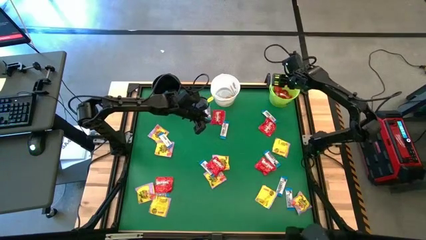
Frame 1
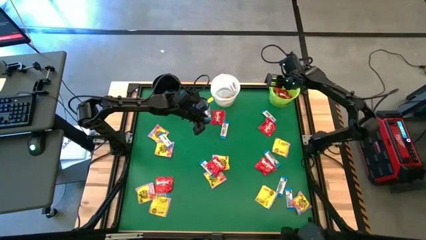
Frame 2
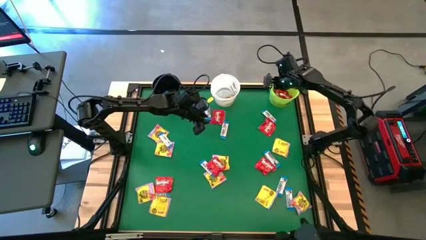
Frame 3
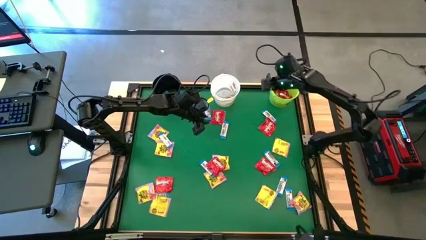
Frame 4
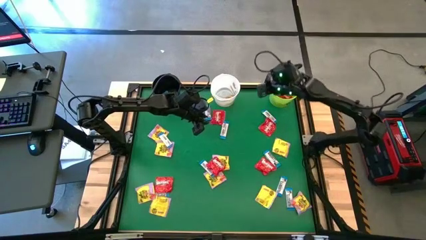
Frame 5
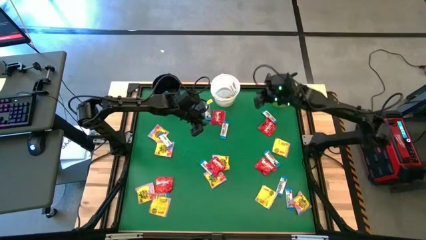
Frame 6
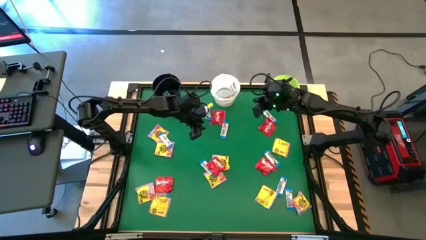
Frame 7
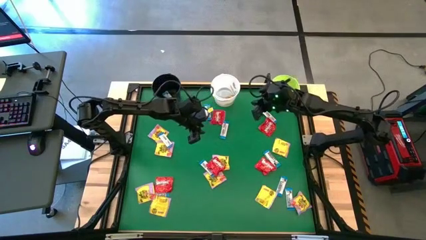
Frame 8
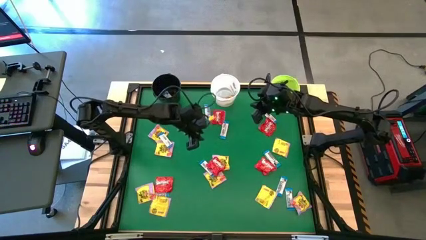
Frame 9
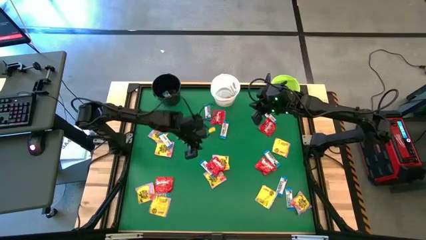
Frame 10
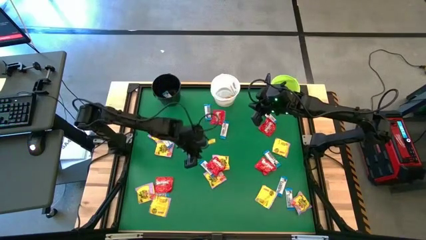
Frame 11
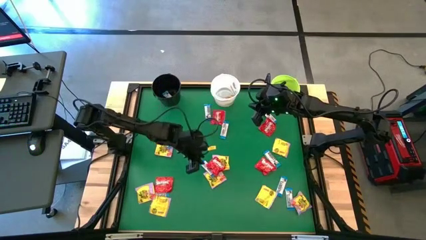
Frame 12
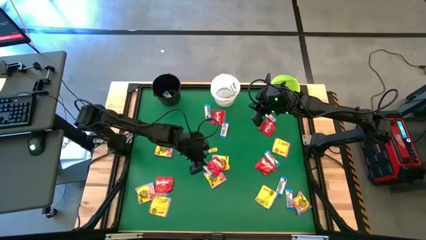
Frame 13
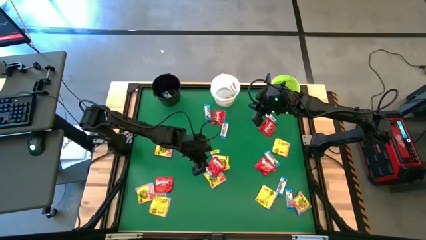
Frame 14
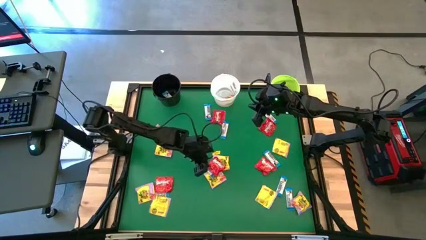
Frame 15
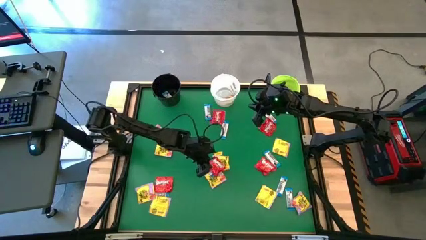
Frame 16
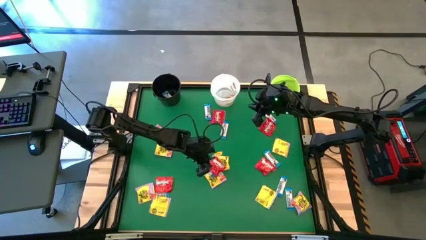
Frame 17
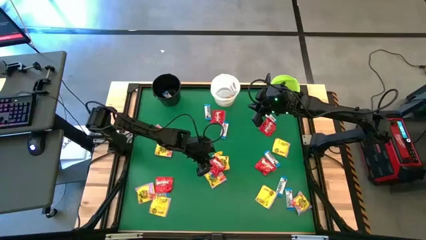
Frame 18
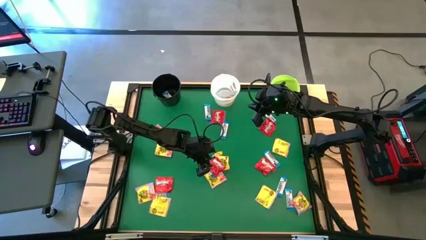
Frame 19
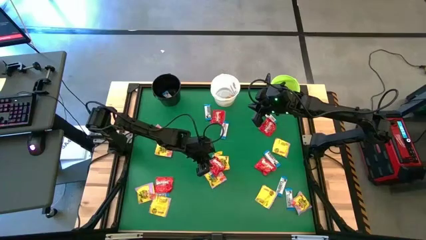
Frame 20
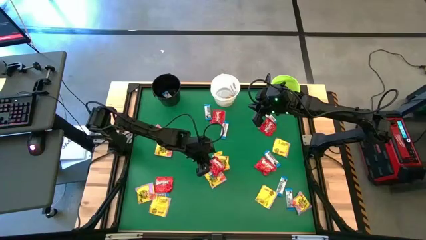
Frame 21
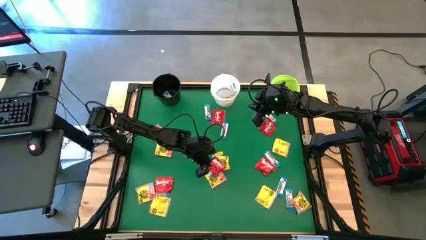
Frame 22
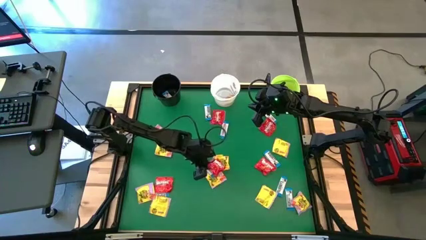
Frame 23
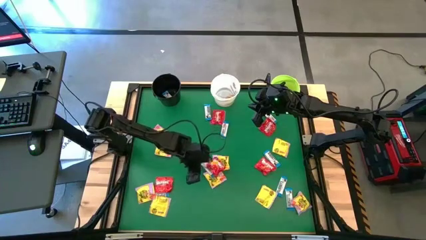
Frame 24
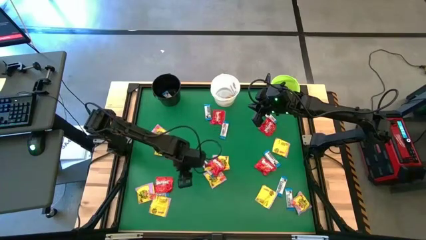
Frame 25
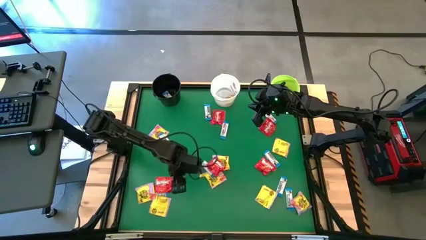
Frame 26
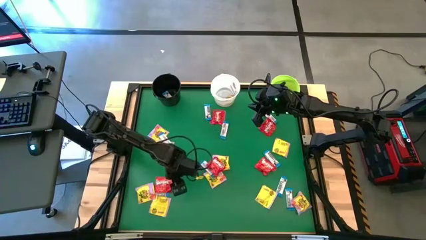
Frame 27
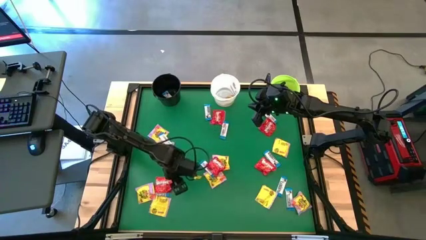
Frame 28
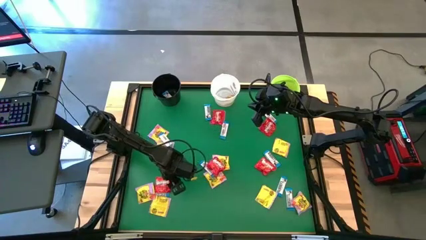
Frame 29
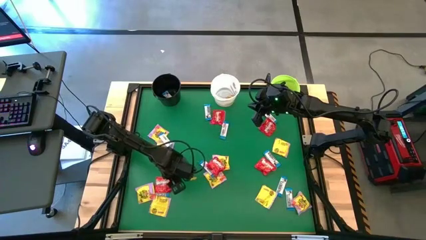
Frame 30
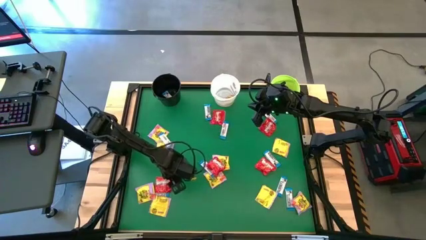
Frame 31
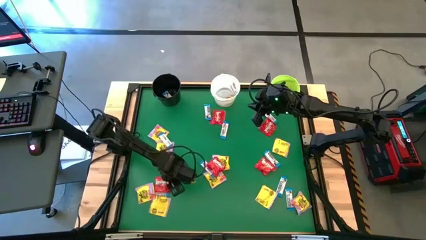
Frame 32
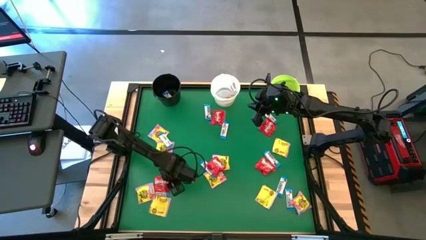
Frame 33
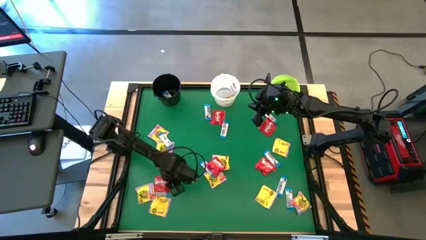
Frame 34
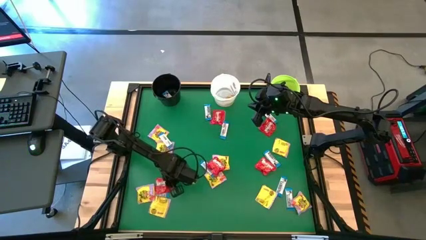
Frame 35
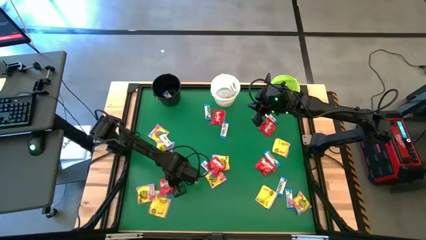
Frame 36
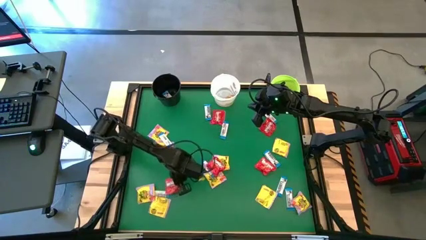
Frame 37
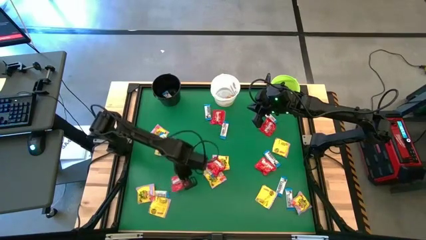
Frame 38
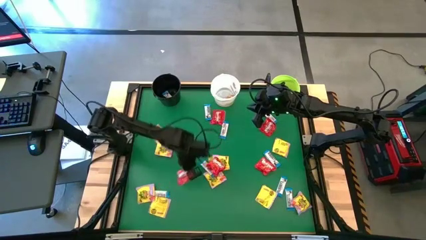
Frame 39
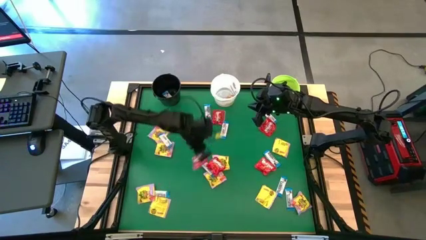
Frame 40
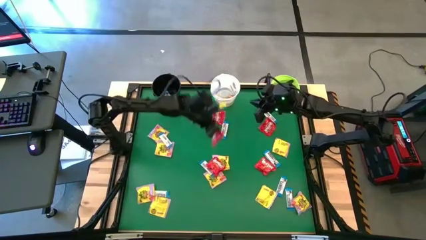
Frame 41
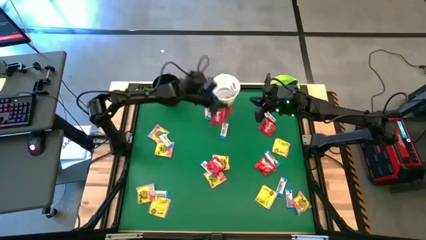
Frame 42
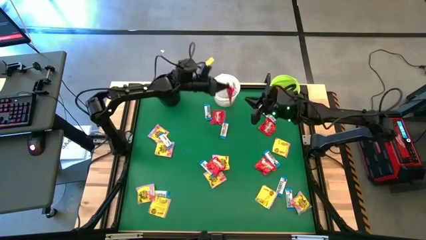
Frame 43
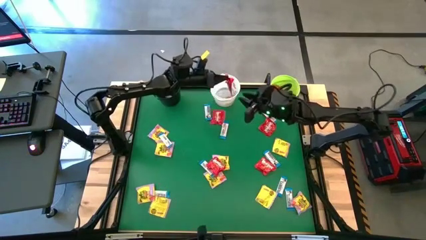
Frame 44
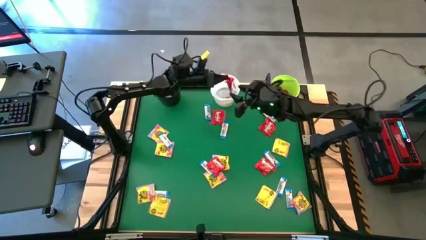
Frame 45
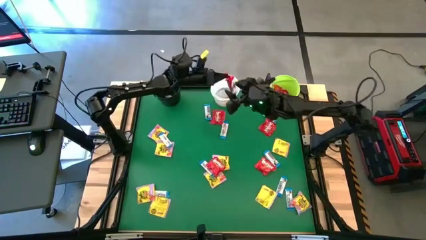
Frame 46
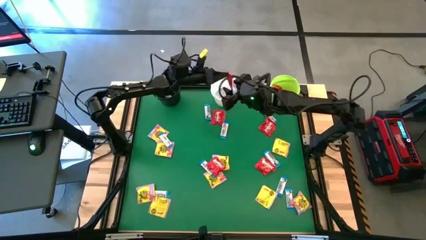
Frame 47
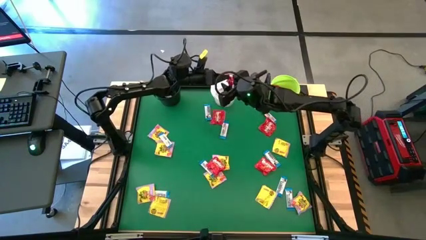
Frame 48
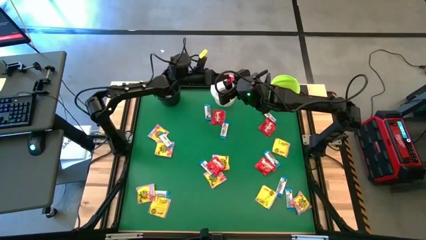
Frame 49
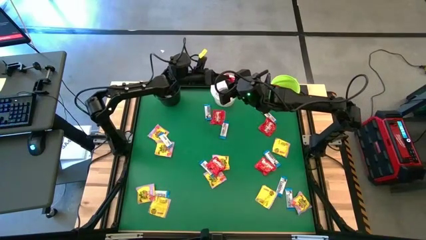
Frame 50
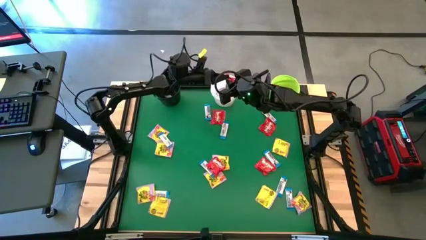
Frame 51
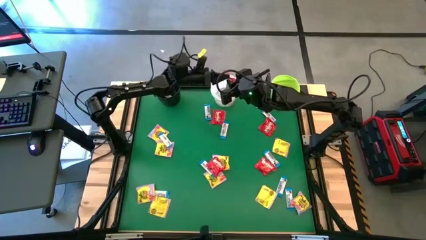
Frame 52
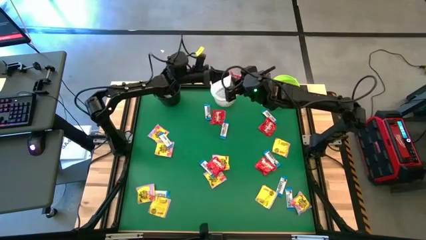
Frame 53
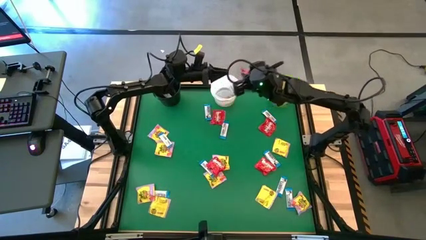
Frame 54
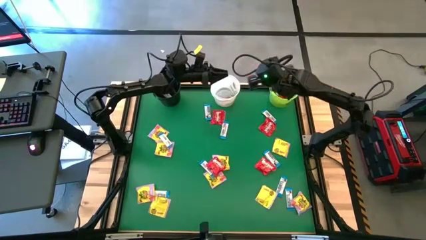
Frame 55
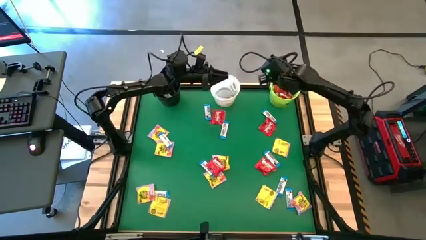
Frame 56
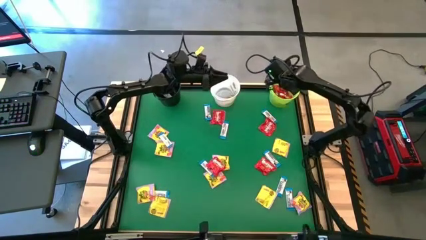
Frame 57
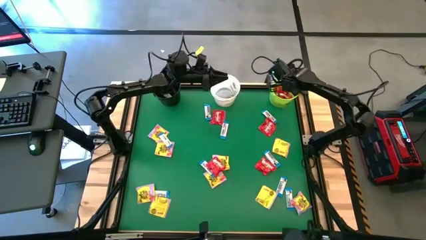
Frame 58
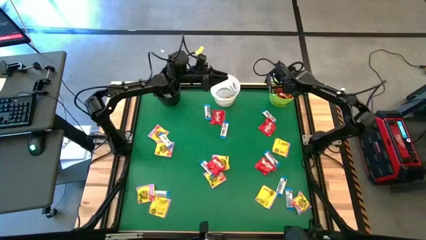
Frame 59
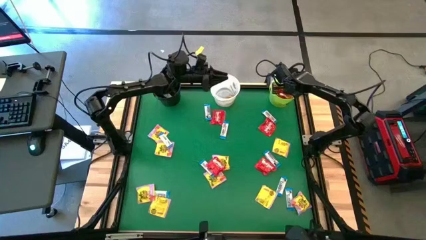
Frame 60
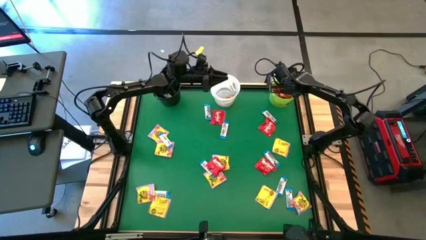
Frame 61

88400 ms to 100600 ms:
Task: Sort candy by brand, put in halloween buckets
Put the red candy into the green bucket

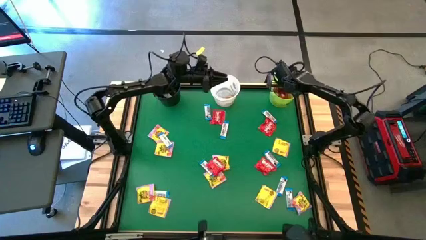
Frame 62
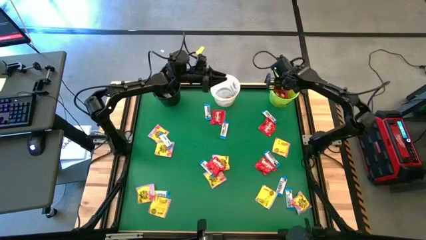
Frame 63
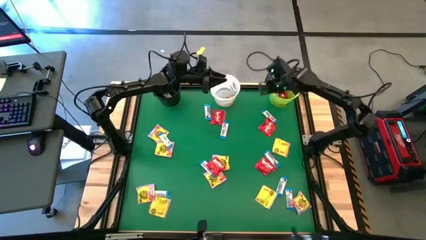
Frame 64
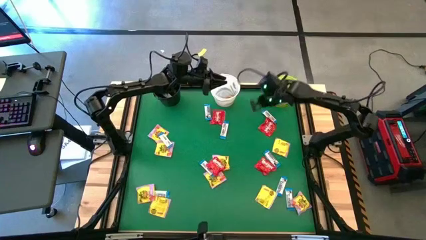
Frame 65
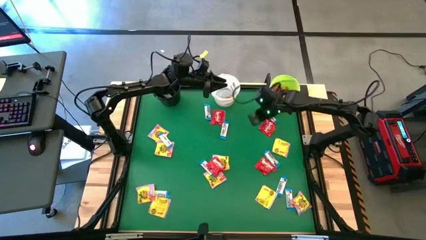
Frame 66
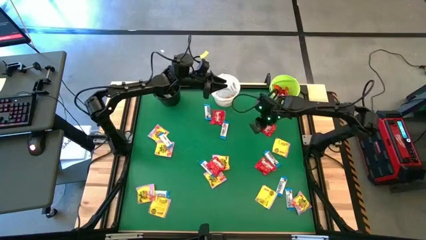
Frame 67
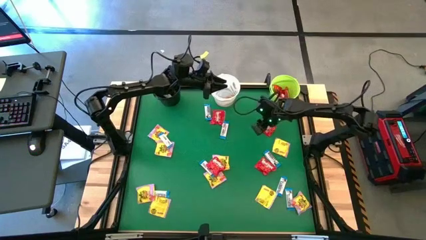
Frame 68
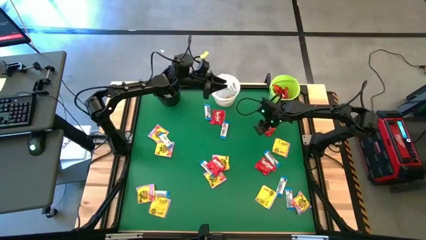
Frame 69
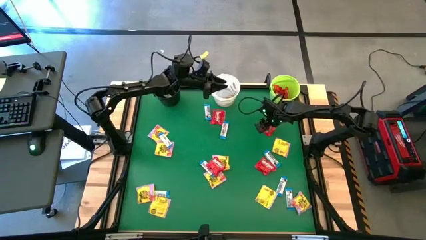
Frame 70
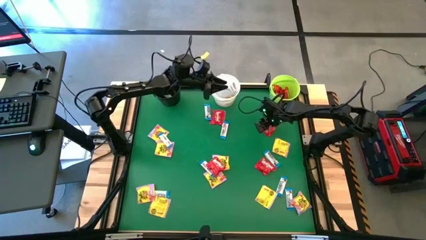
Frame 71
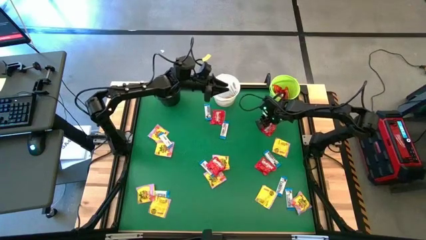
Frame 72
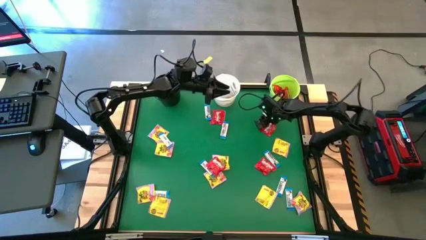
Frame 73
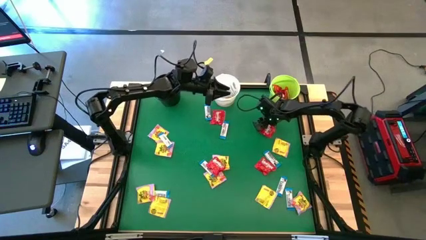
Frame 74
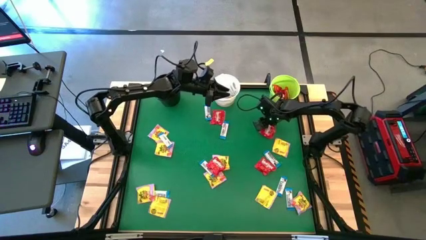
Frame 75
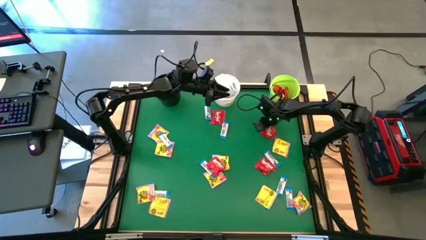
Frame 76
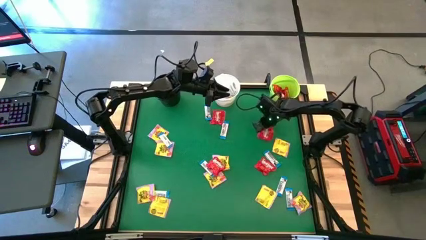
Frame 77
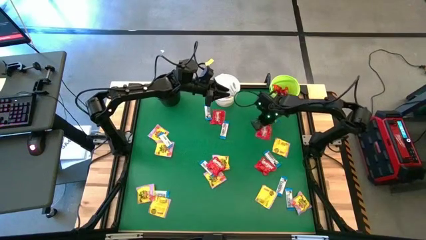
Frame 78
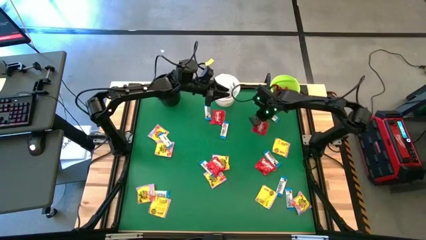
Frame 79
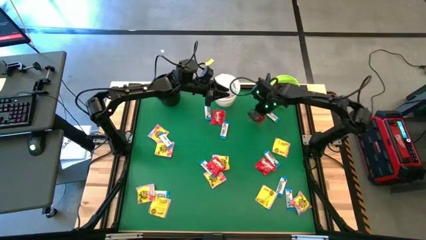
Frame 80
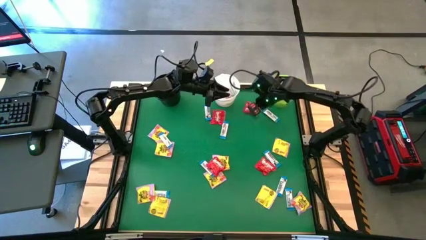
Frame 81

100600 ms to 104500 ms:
Put the red candy into the green bucket
